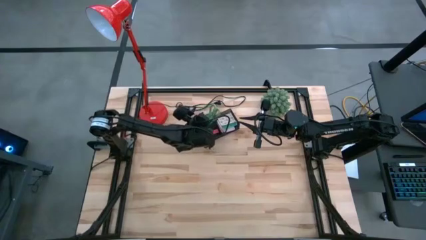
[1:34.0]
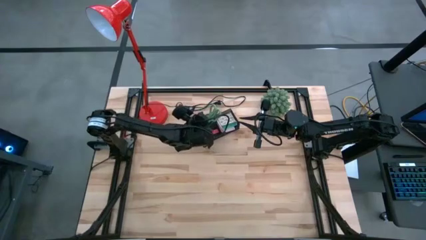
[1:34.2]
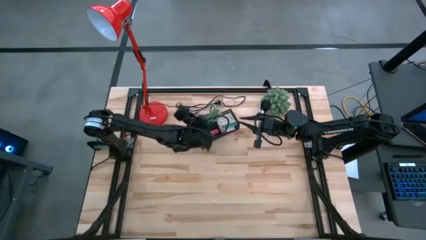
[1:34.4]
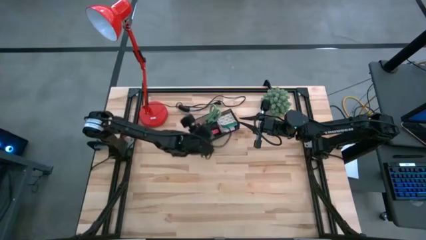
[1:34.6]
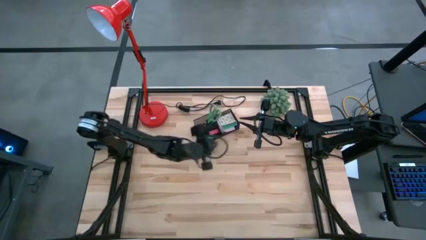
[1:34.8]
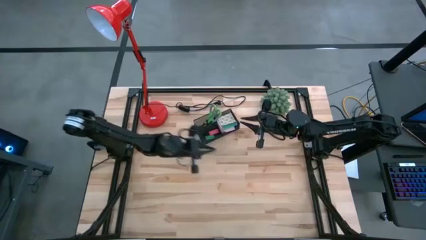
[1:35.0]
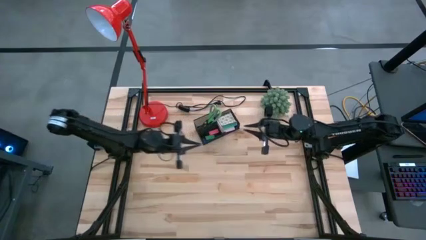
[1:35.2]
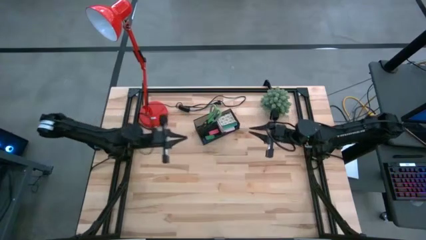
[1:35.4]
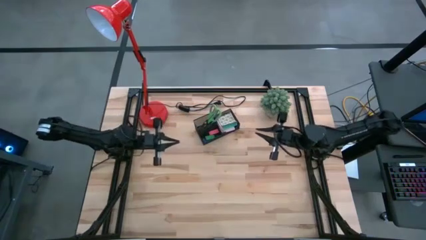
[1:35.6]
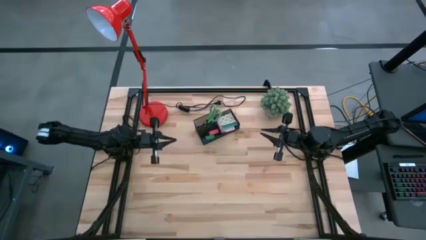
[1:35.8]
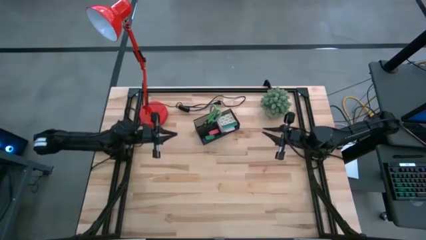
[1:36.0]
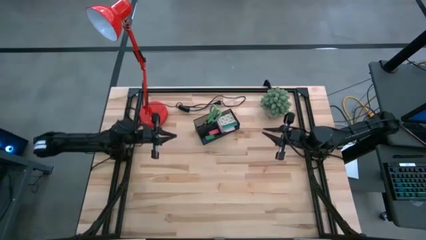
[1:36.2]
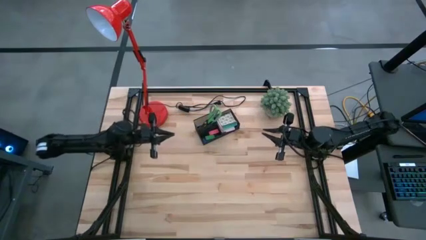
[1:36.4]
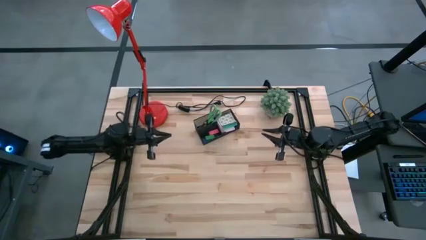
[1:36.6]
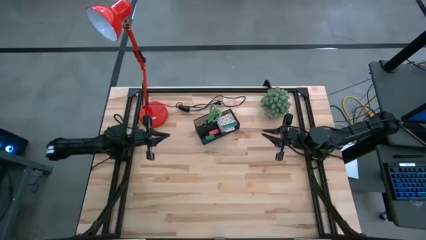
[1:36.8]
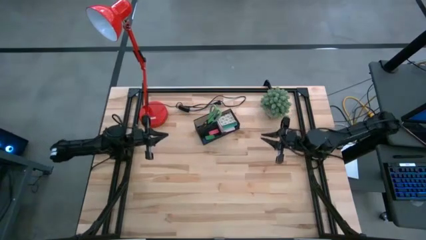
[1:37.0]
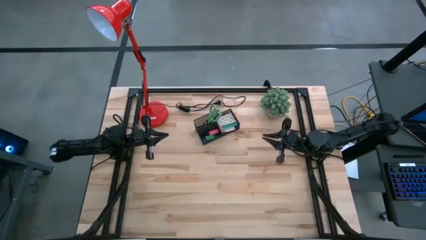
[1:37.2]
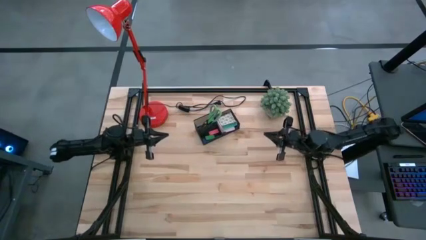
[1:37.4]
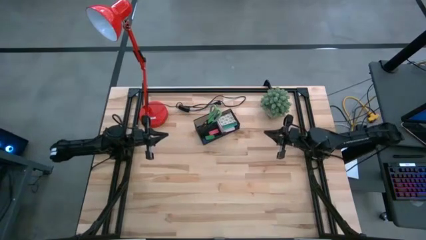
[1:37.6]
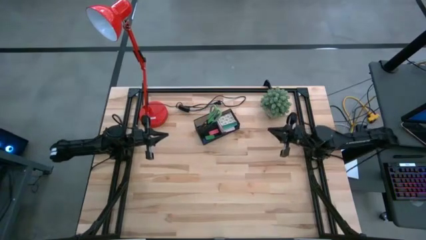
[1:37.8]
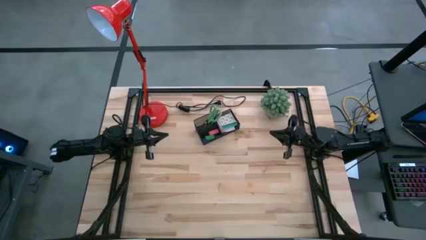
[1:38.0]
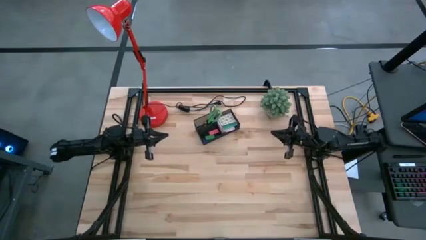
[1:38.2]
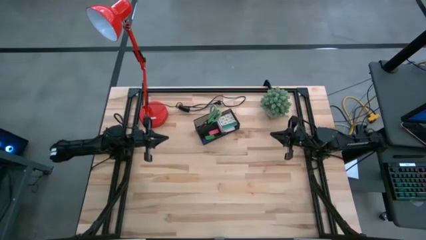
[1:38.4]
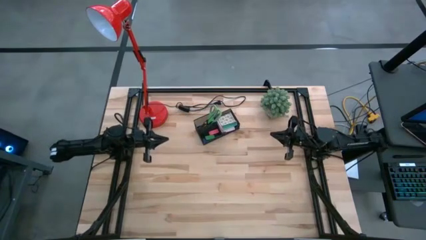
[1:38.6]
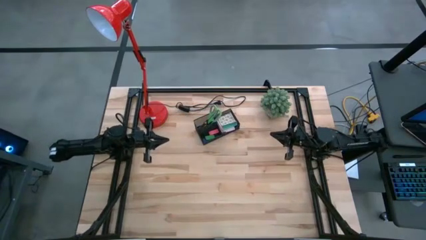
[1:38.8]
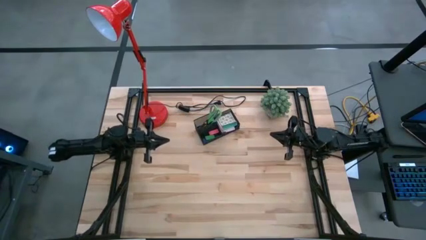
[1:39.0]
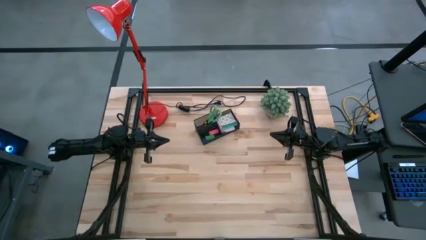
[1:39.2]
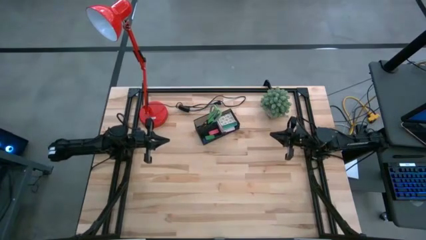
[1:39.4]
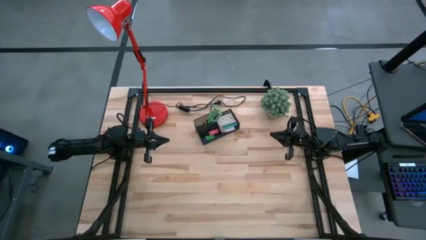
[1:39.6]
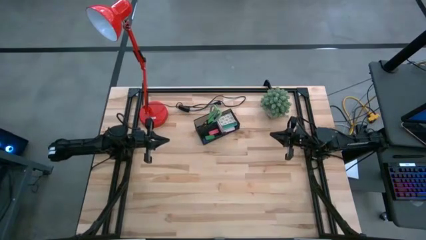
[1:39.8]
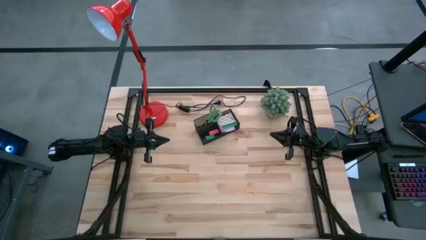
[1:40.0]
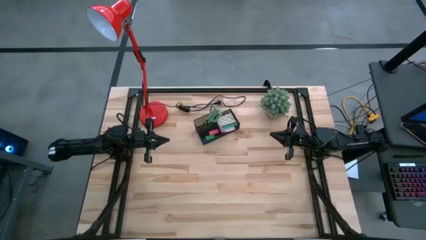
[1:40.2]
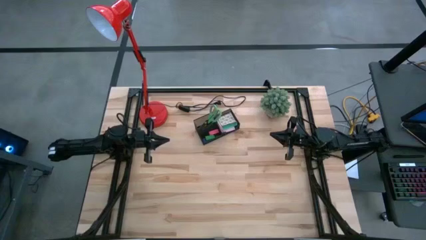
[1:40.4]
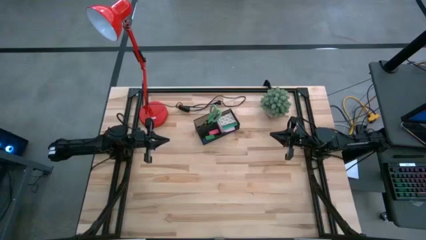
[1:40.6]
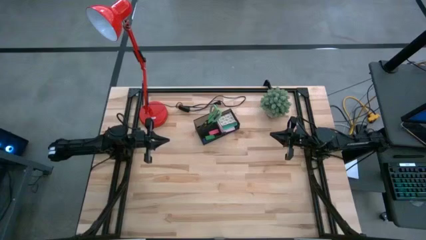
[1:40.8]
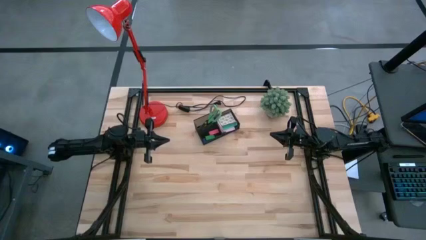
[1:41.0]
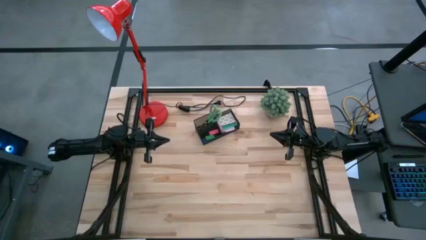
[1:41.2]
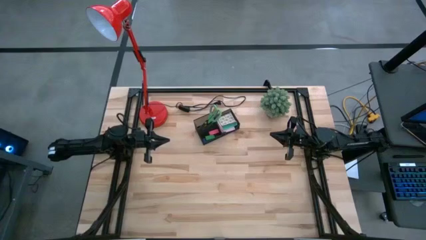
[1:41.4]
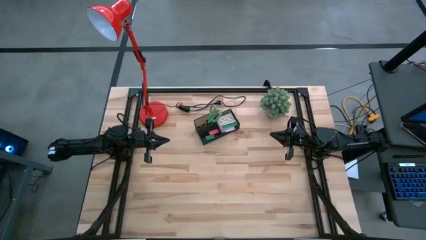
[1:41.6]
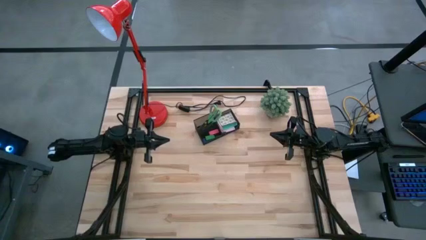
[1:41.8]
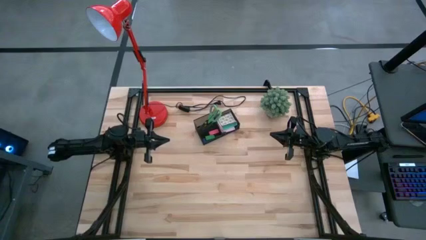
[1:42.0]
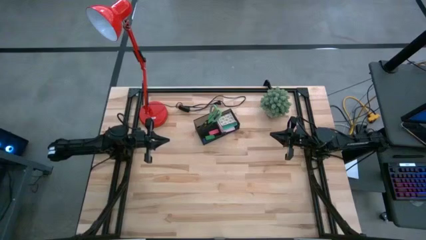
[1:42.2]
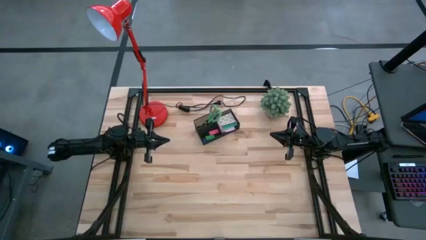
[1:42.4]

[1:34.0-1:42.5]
Task: Pick and place office supplies into organizer
Return to Home Position

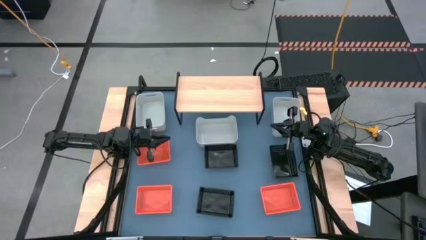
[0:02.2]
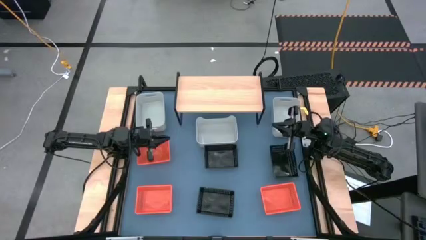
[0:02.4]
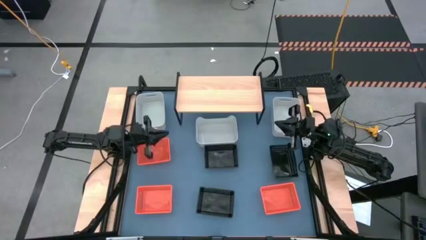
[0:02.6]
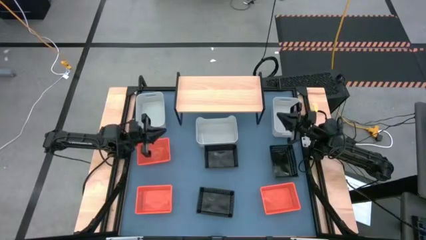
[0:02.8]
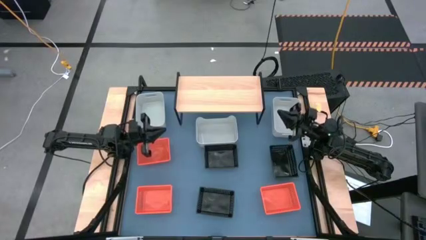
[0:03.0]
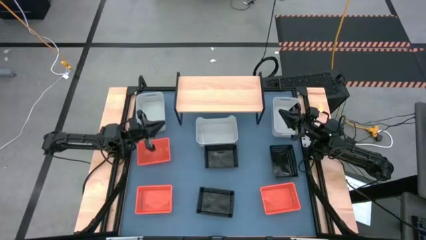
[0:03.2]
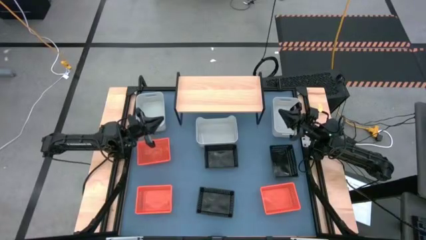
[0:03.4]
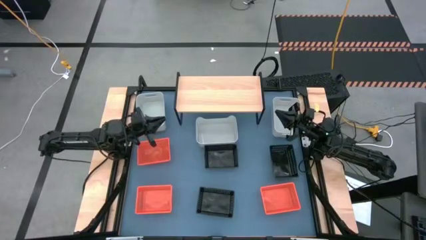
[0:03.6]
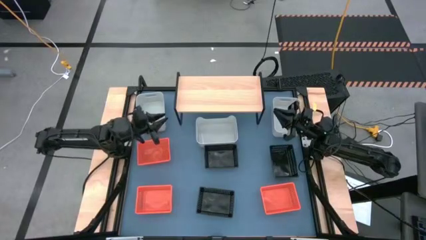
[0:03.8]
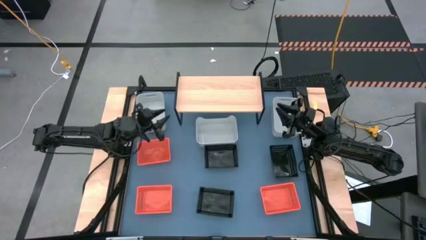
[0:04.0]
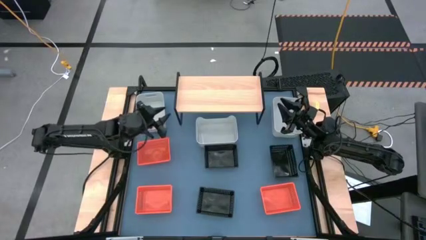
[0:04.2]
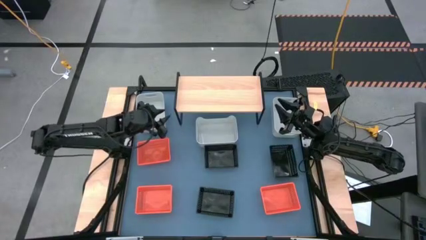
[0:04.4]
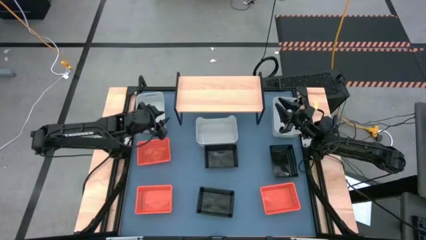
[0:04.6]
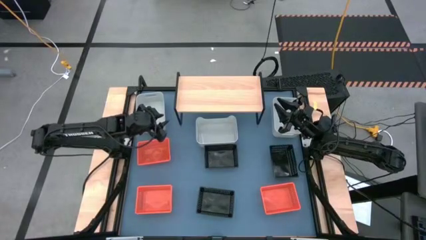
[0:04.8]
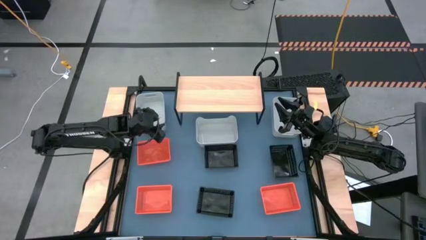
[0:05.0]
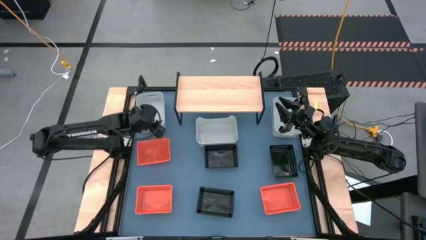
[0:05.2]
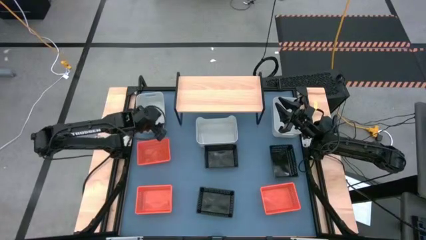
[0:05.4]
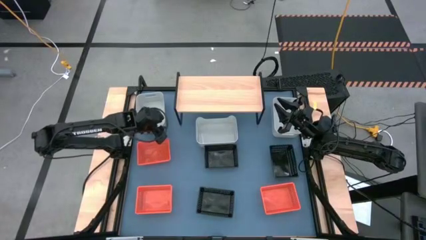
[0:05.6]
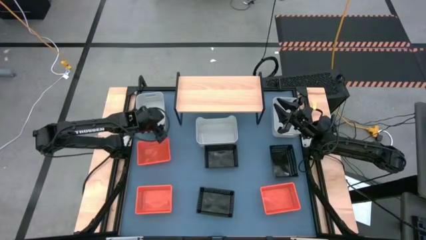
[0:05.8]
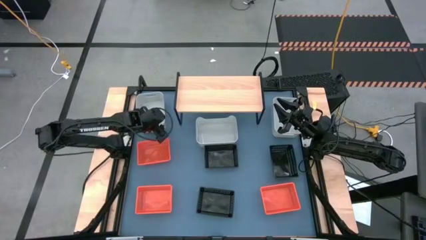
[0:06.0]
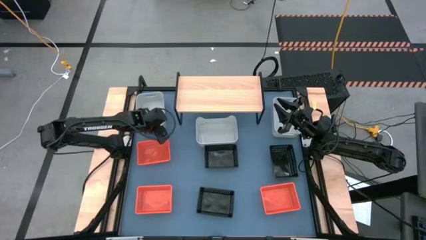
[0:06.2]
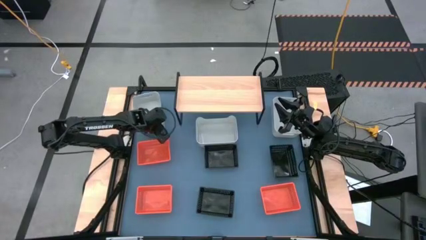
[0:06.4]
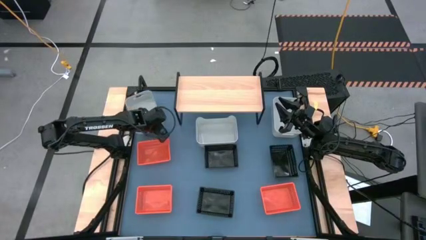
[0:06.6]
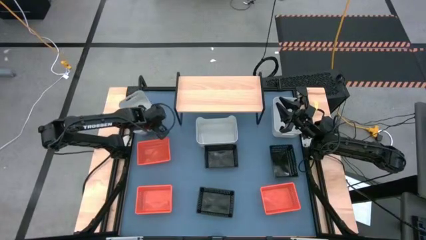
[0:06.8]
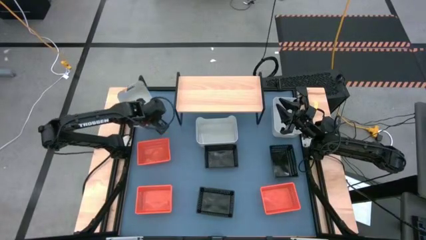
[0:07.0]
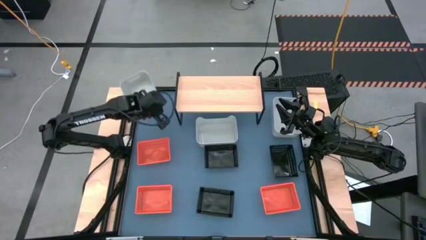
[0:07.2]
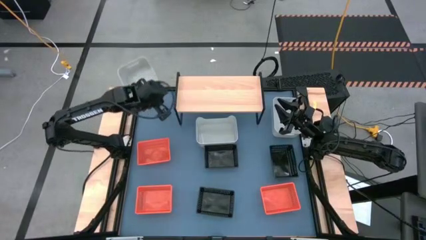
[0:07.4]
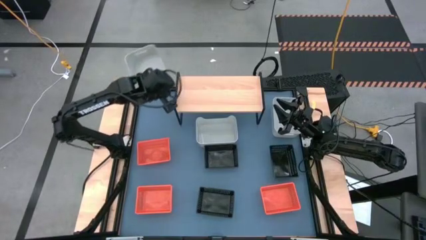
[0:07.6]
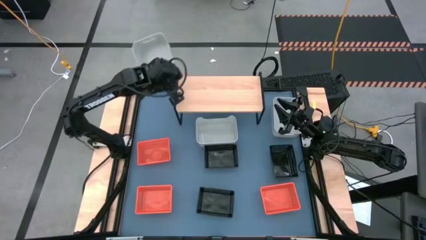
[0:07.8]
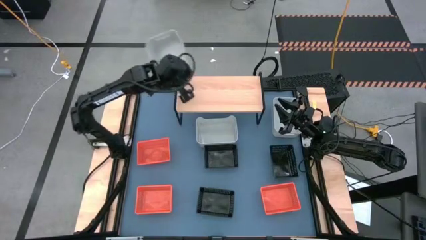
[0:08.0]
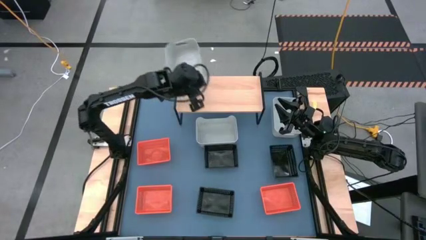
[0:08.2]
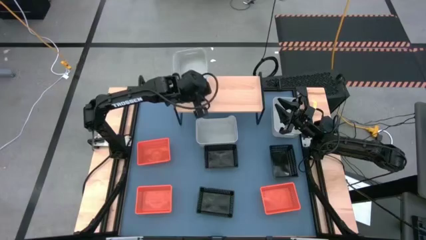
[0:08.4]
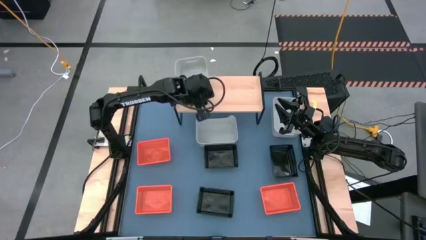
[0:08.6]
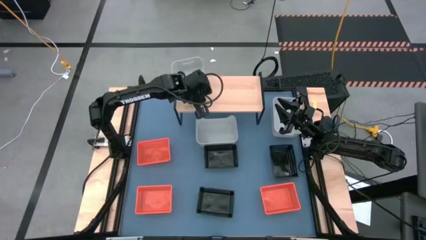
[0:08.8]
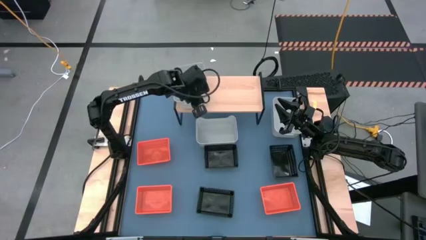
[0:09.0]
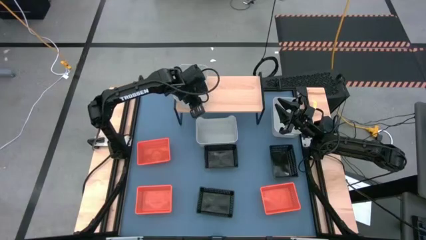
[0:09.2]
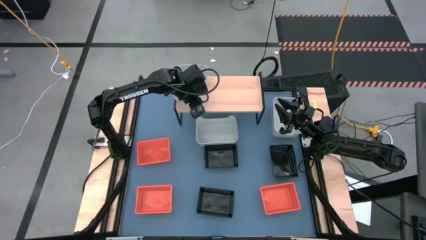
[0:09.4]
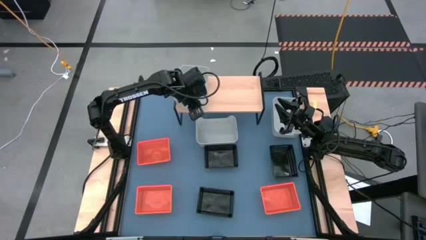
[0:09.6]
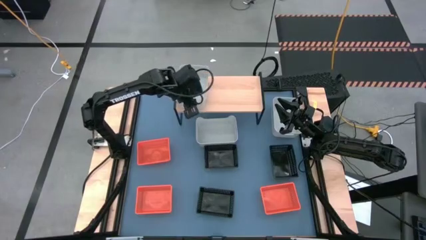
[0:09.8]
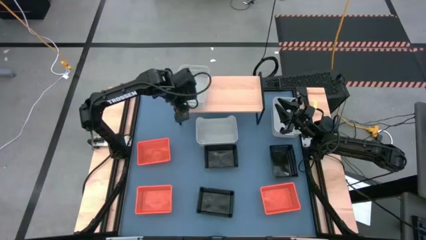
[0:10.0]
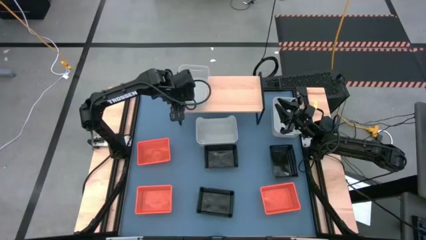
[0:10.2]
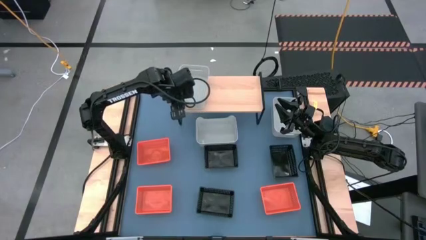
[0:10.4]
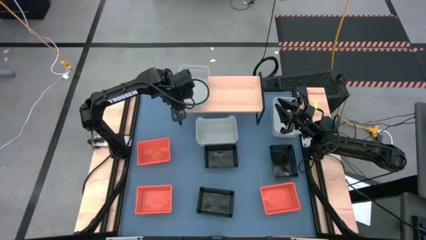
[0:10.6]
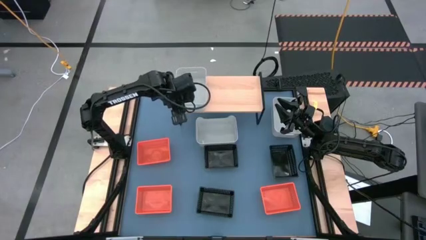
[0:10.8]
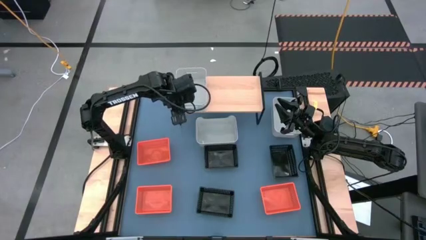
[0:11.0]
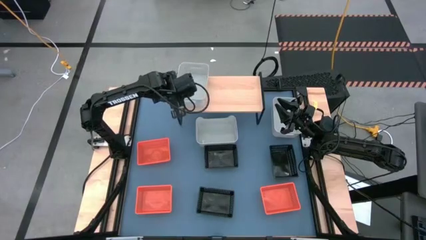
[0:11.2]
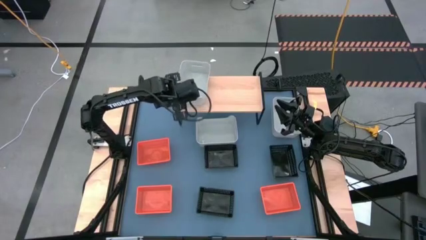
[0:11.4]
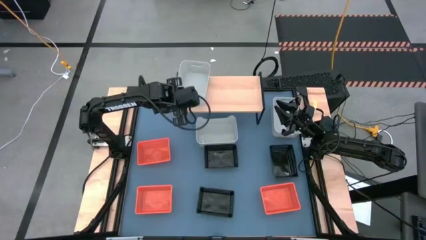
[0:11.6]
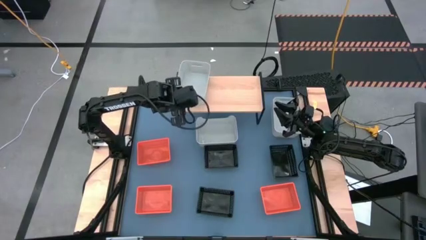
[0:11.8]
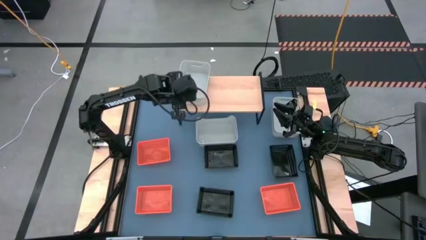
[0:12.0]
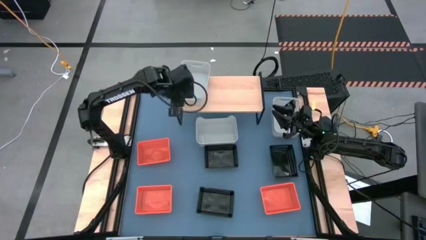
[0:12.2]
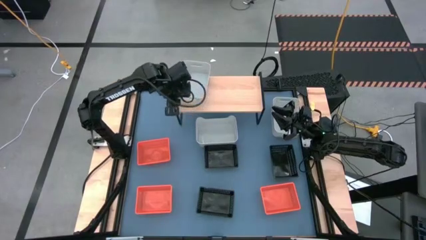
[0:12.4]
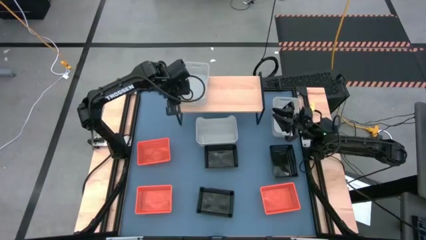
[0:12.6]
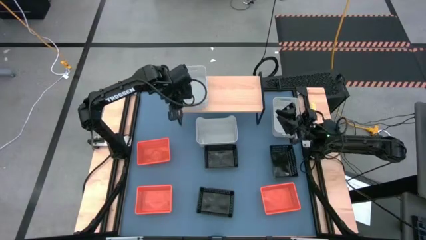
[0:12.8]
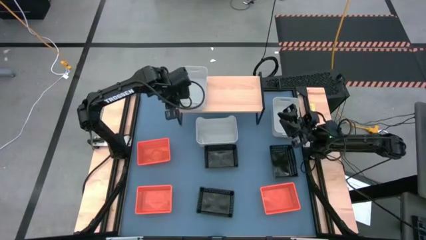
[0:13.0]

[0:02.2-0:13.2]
Task: Stack baskets on shelf by color
Put the left gray bin on the shelf
